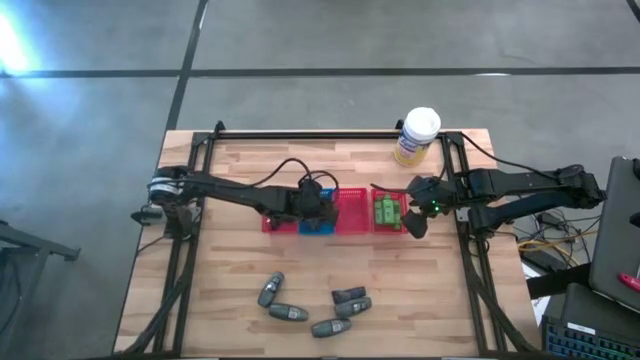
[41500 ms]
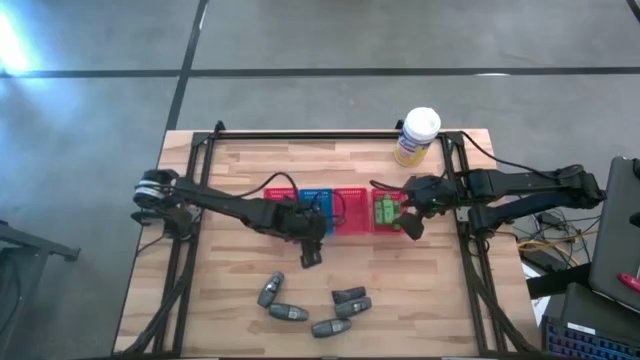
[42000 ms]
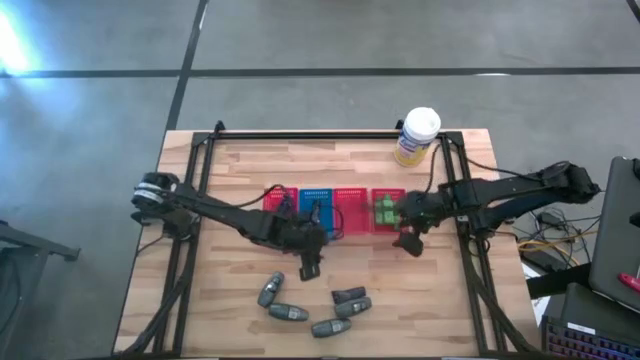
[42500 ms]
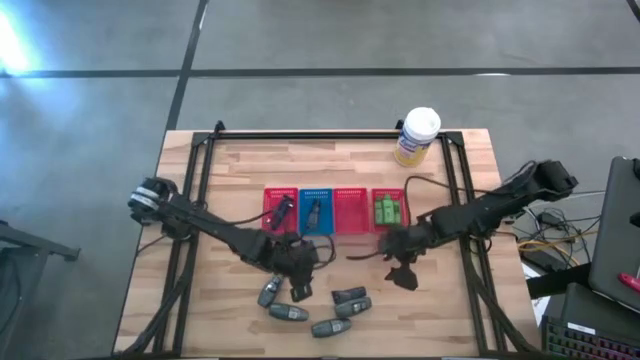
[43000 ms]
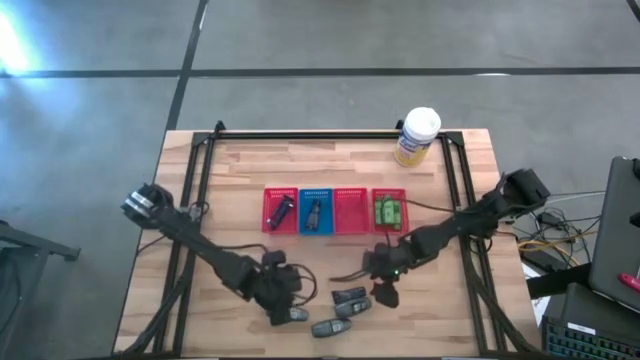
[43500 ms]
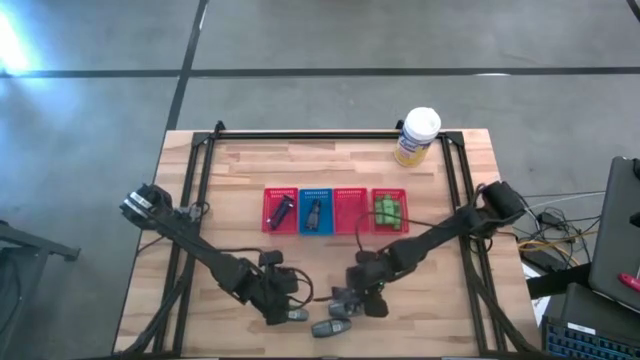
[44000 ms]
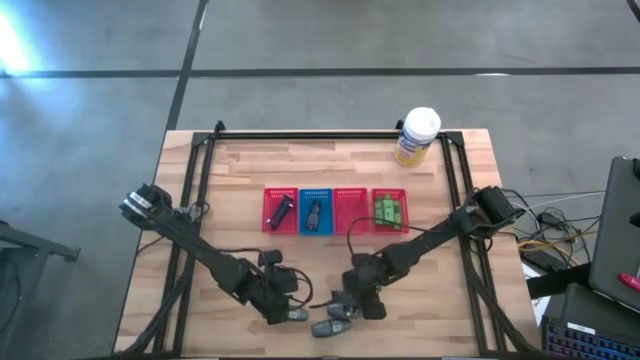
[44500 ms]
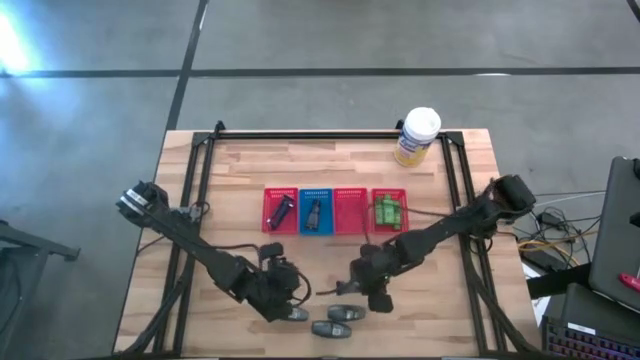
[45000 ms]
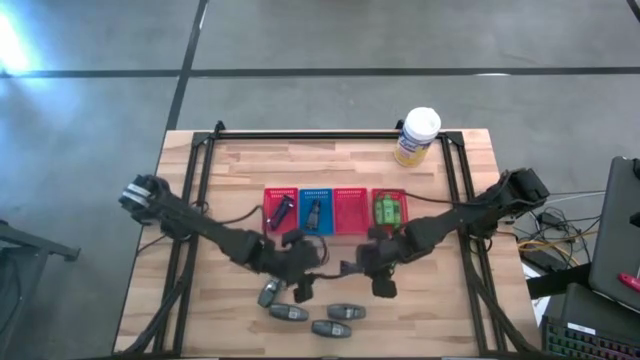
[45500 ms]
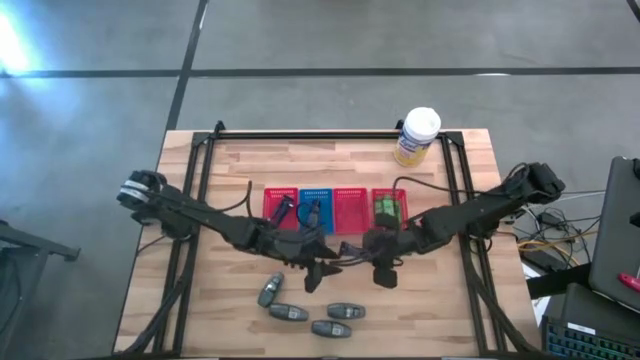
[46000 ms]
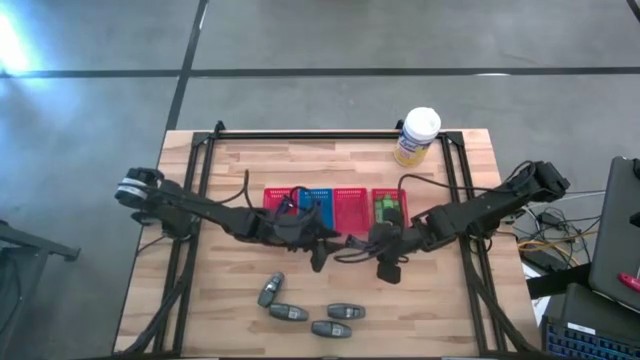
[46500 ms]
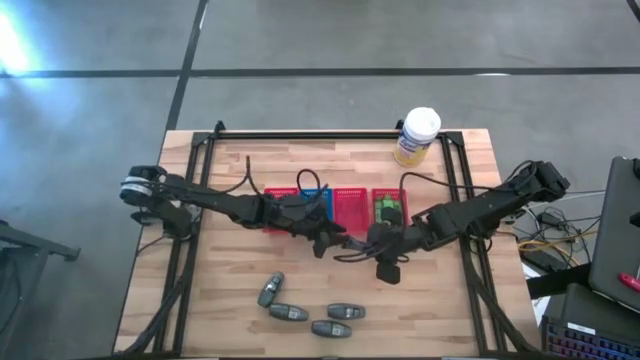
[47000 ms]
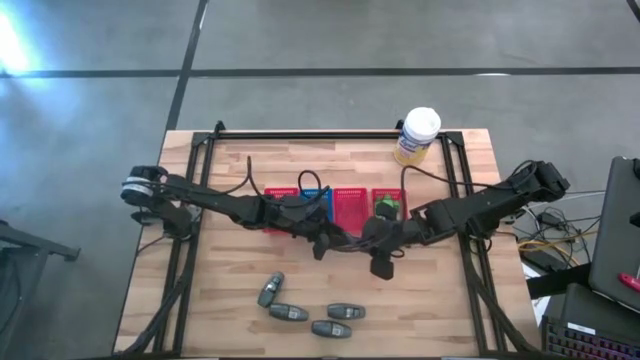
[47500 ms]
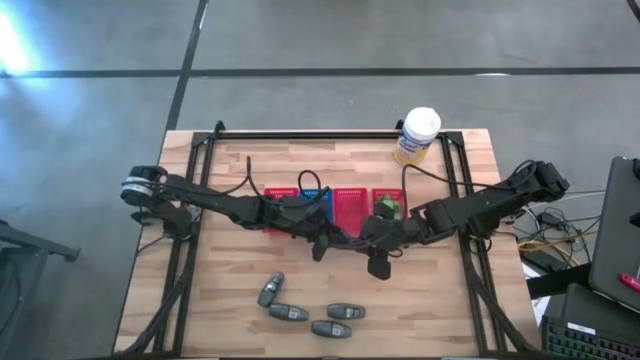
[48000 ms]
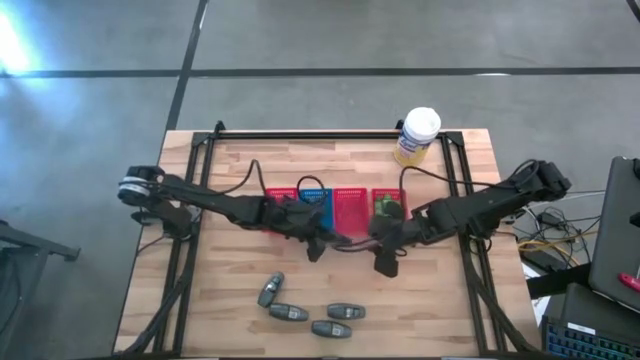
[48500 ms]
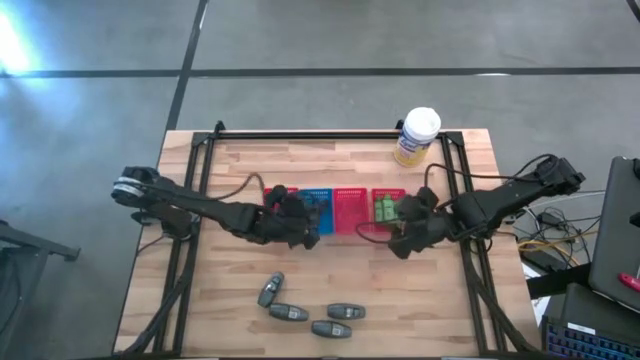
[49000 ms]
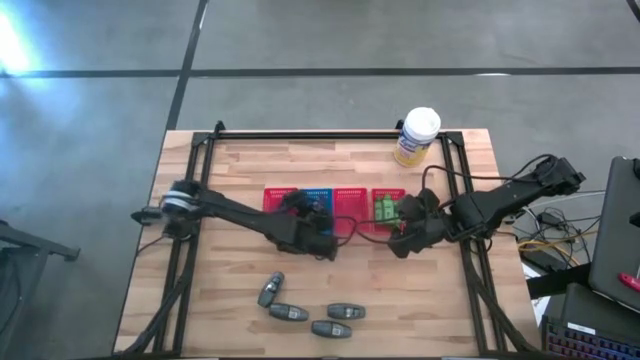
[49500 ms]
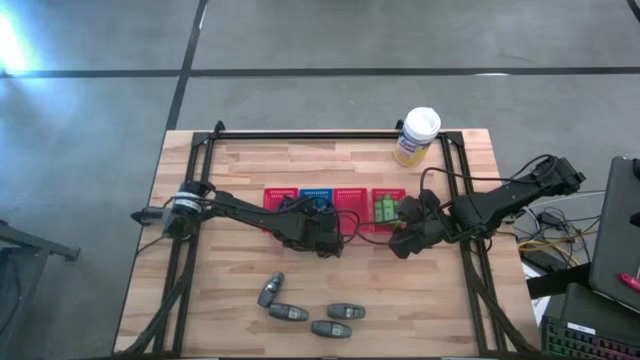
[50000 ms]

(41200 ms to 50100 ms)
Task: Pick & Place Travel size toiletries
Put the blue shave cream into the blue bin

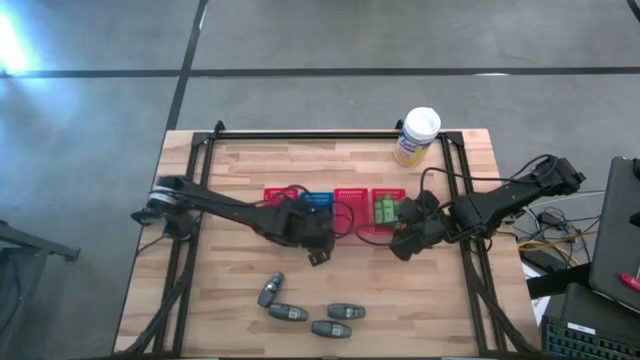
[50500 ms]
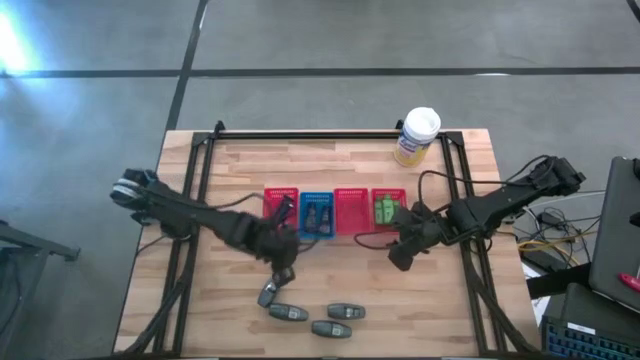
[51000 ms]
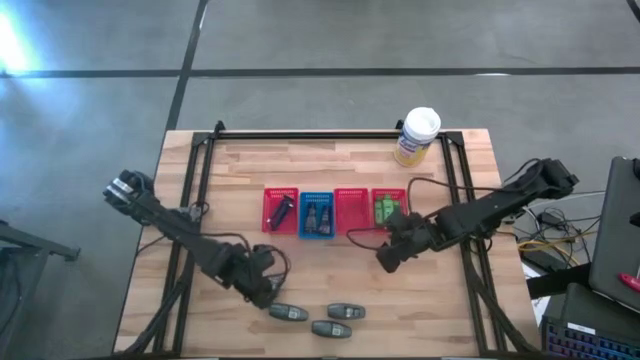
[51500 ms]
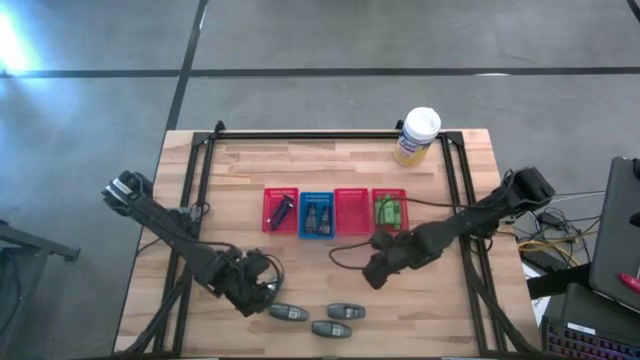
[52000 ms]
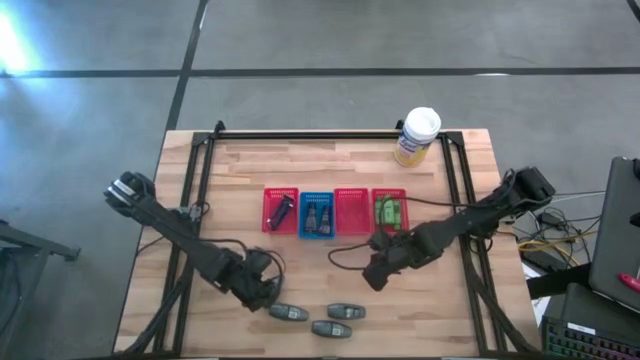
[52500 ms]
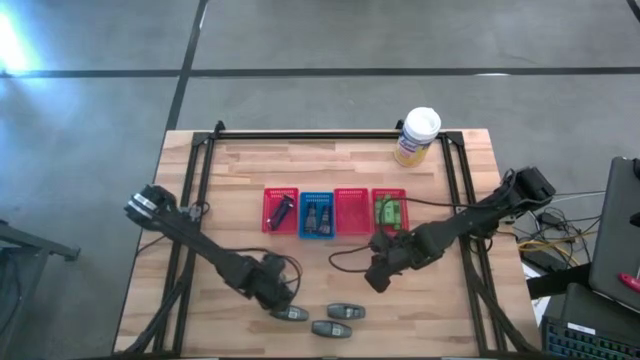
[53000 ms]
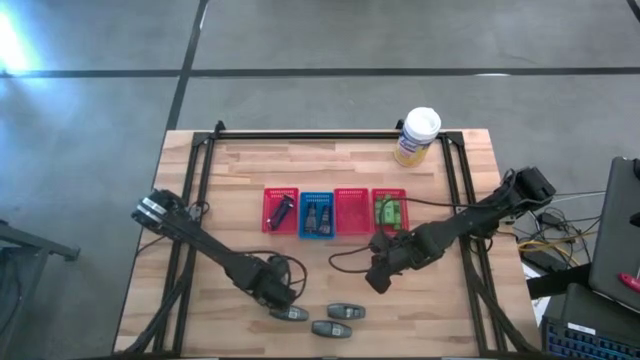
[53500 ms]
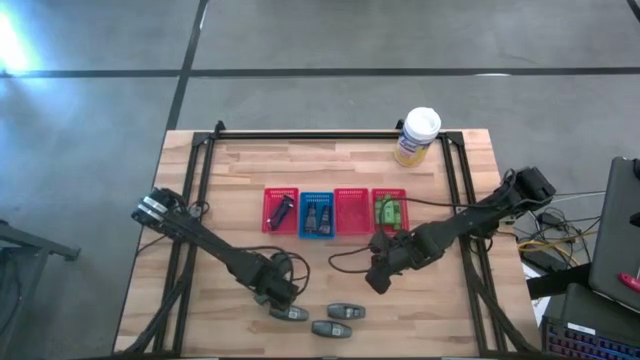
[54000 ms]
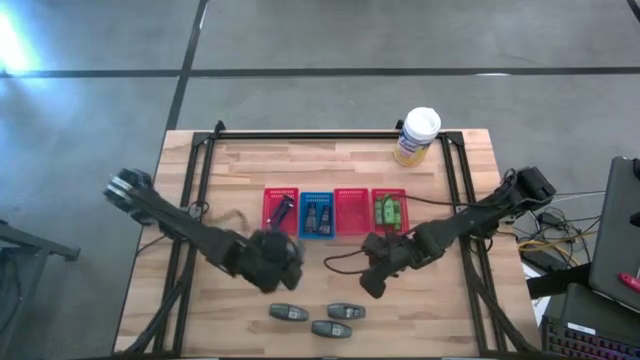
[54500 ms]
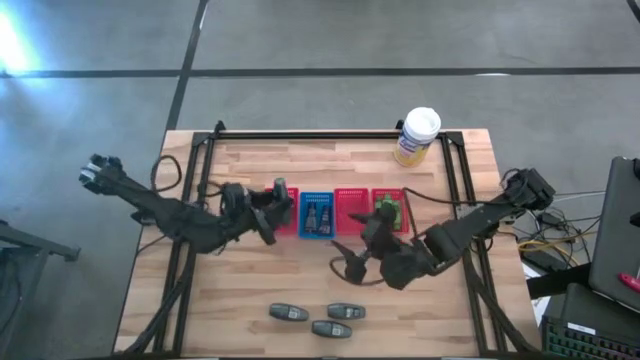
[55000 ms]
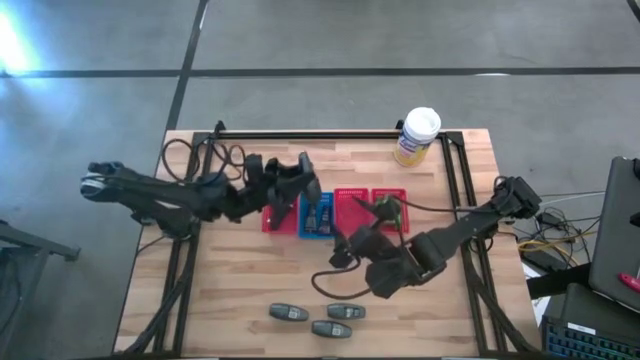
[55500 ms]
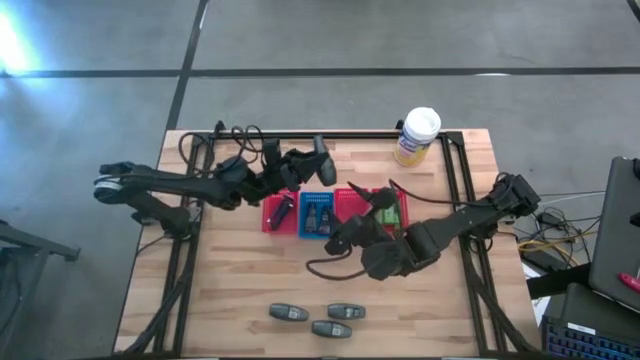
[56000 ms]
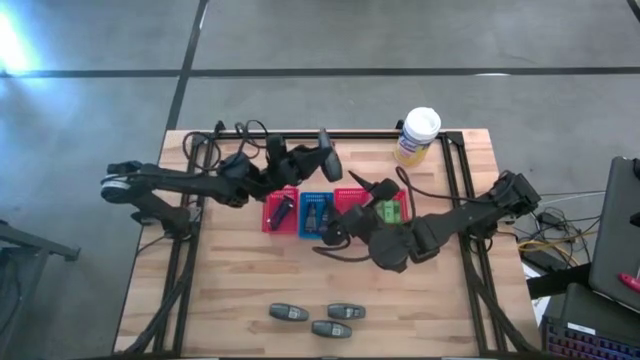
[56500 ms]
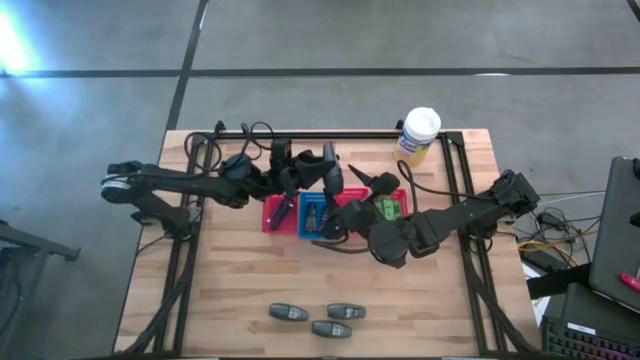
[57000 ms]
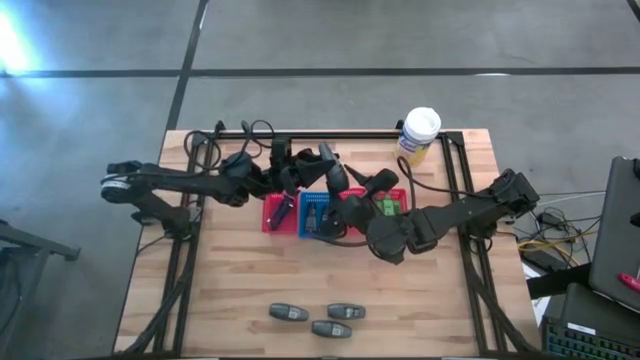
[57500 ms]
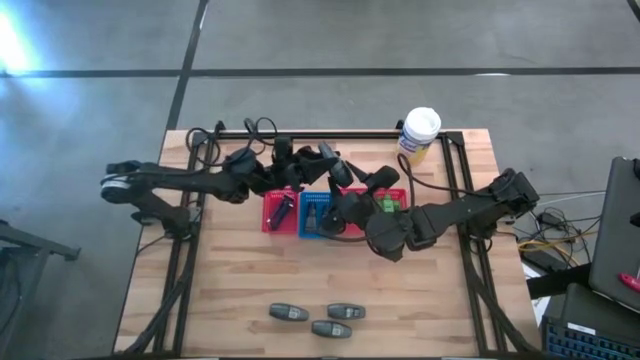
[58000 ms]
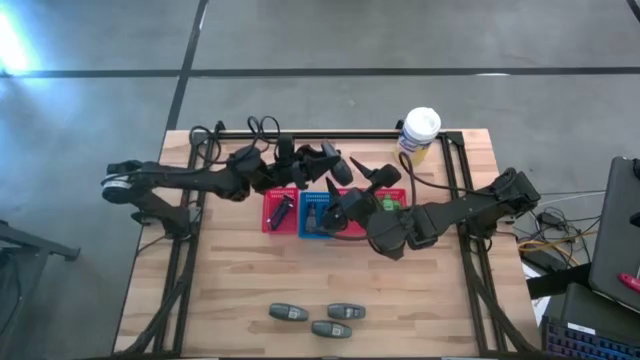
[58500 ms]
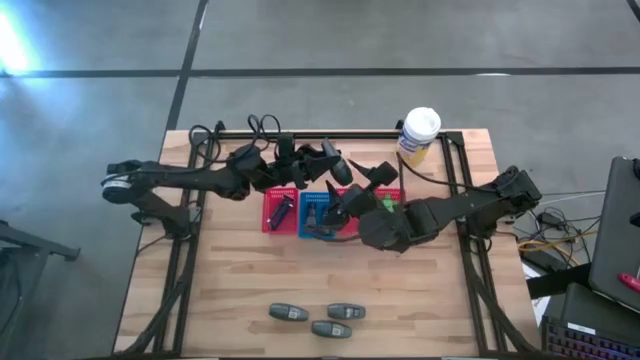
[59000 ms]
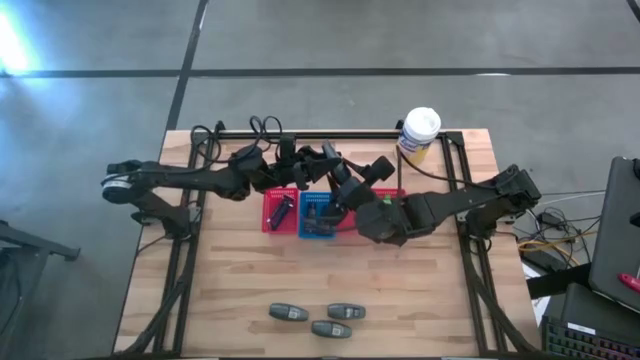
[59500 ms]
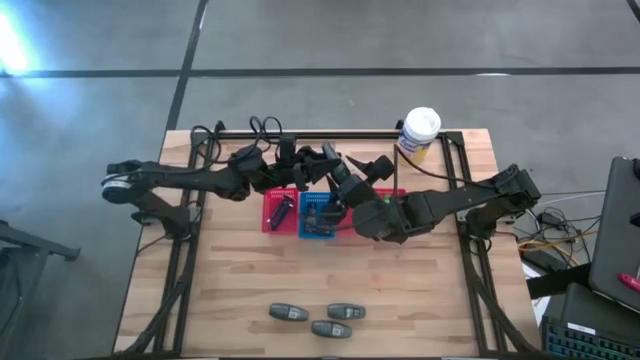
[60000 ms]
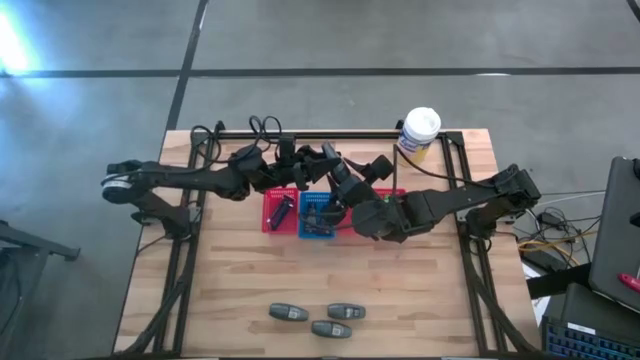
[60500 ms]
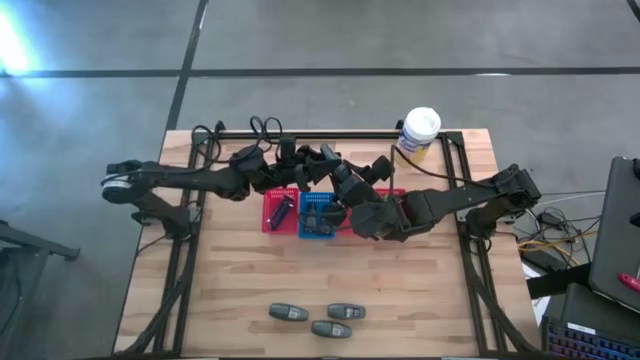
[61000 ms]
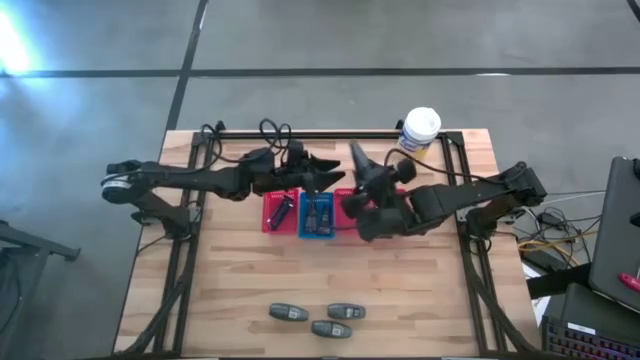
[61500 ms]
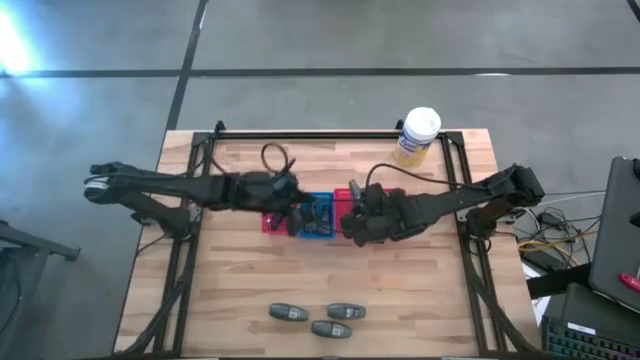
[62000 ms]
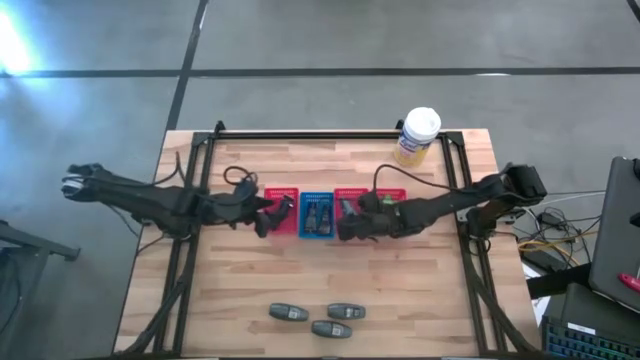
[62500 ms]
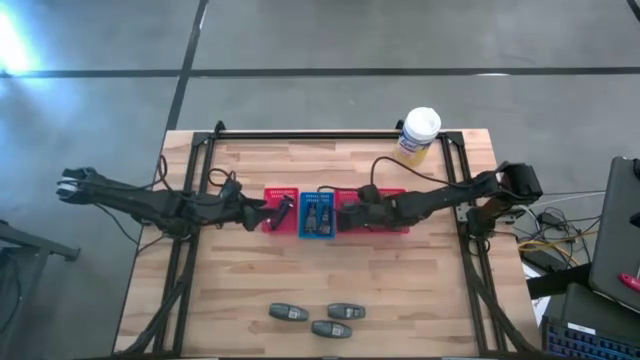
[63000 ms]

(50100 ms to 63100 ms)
Put the gray deodorant into the middle red bin
